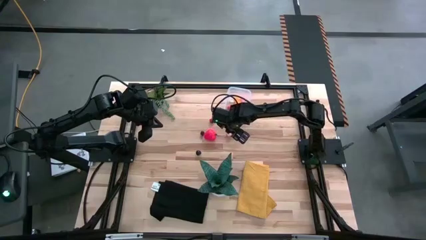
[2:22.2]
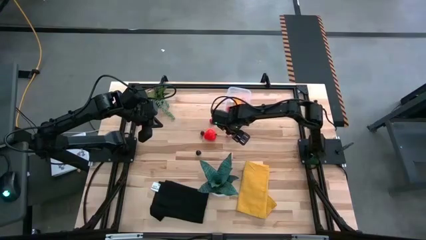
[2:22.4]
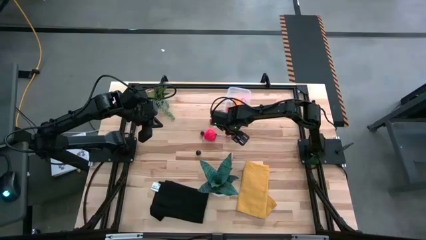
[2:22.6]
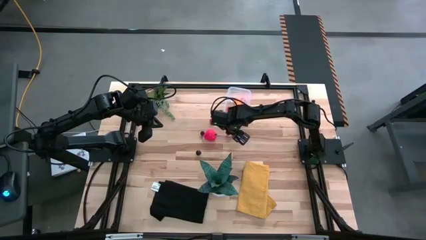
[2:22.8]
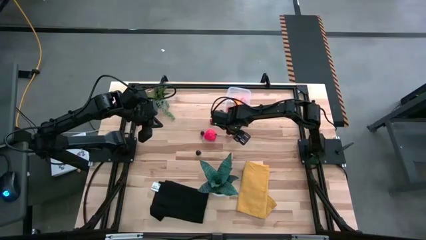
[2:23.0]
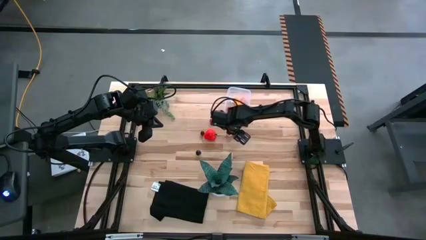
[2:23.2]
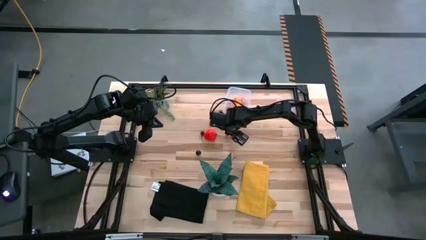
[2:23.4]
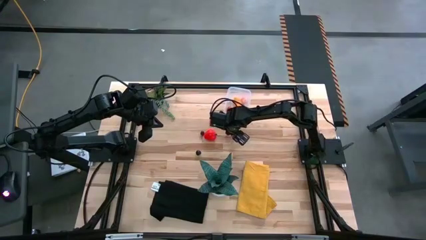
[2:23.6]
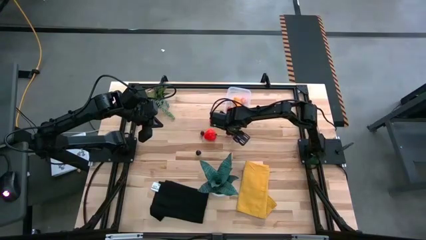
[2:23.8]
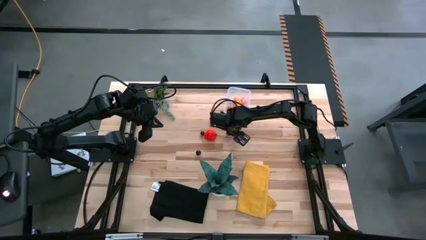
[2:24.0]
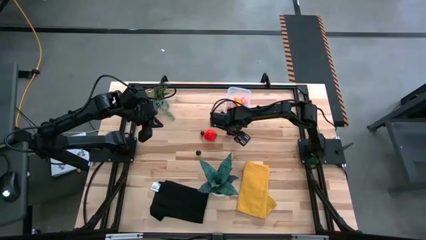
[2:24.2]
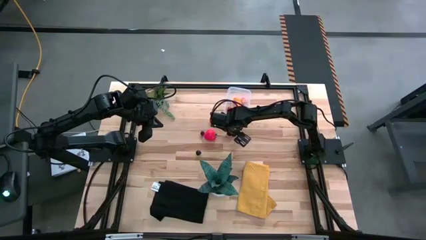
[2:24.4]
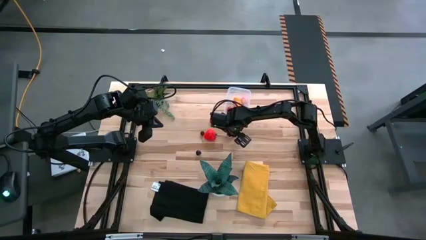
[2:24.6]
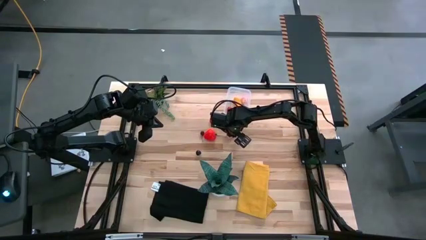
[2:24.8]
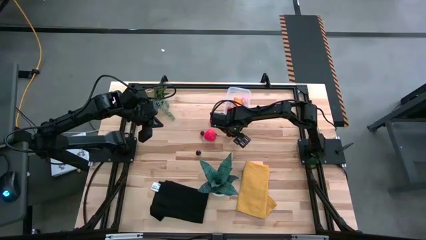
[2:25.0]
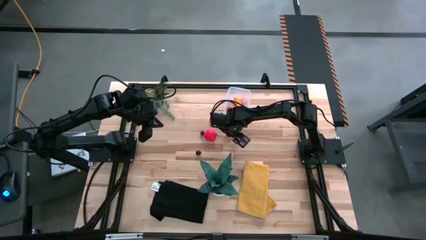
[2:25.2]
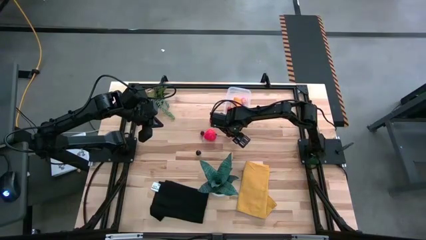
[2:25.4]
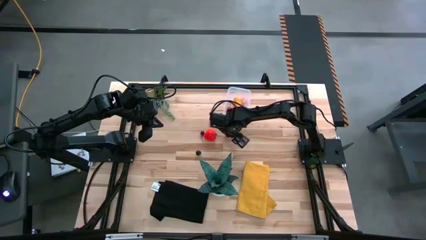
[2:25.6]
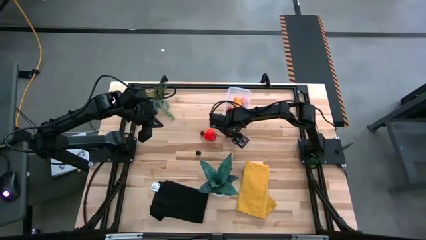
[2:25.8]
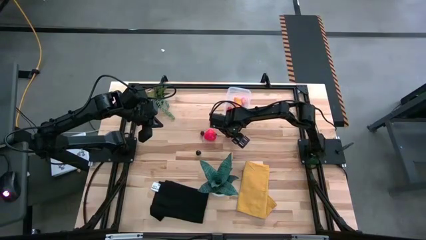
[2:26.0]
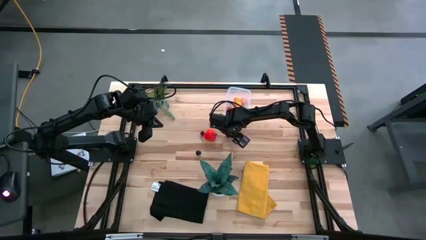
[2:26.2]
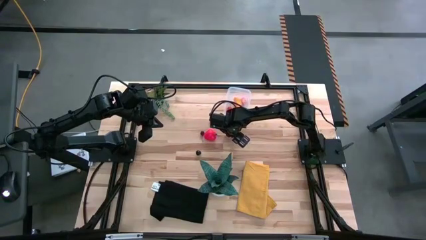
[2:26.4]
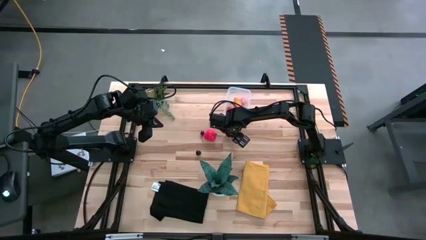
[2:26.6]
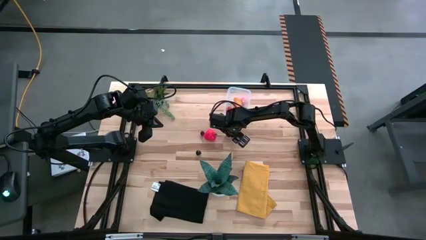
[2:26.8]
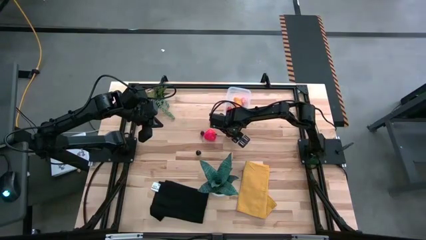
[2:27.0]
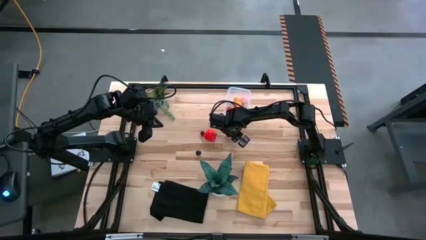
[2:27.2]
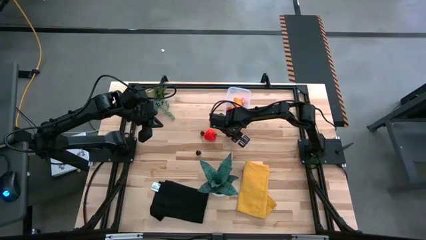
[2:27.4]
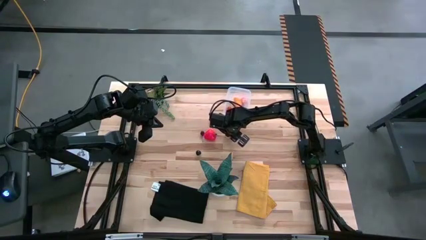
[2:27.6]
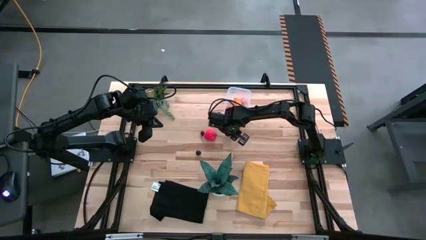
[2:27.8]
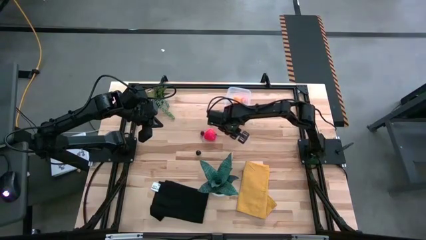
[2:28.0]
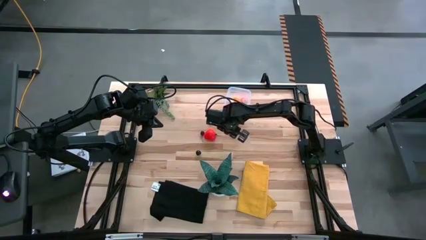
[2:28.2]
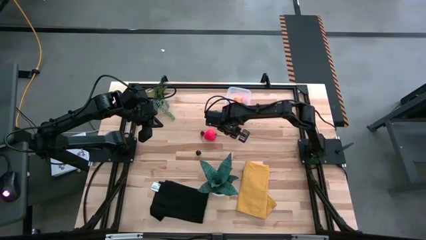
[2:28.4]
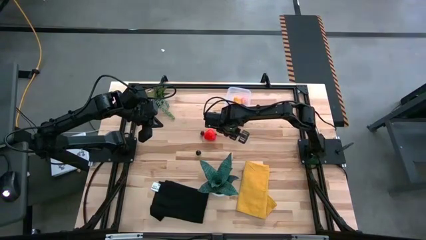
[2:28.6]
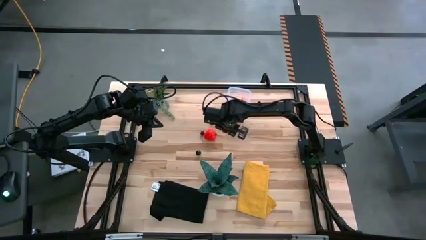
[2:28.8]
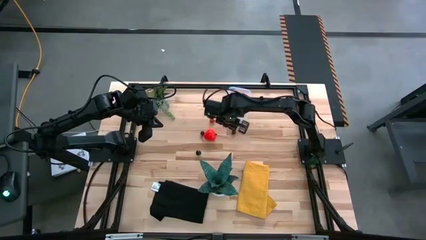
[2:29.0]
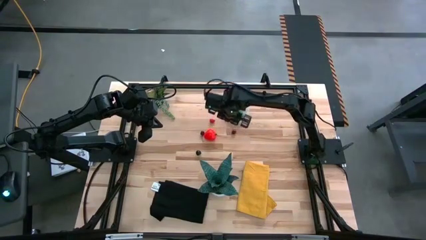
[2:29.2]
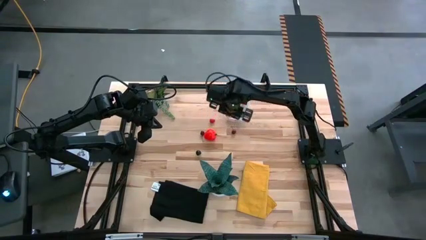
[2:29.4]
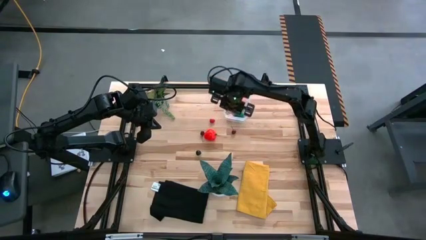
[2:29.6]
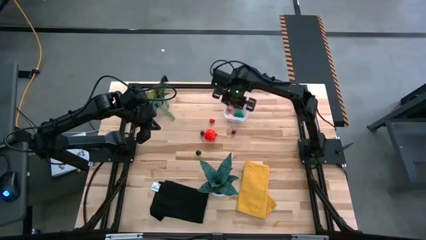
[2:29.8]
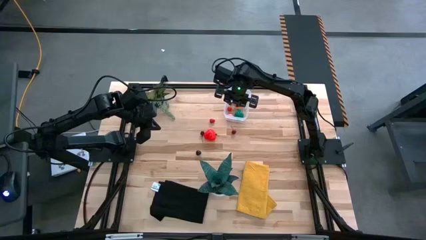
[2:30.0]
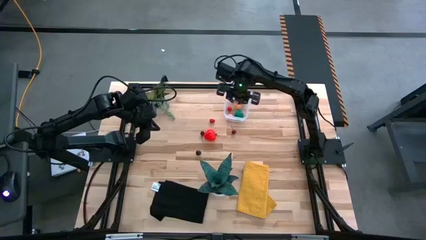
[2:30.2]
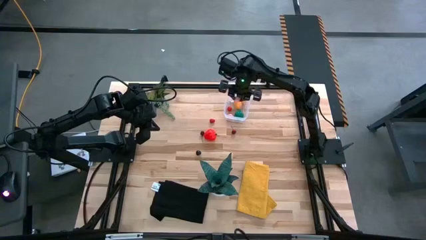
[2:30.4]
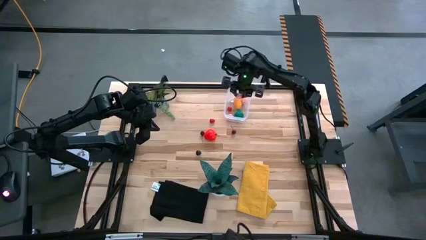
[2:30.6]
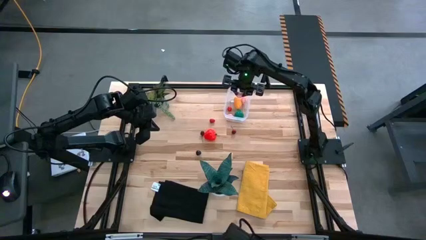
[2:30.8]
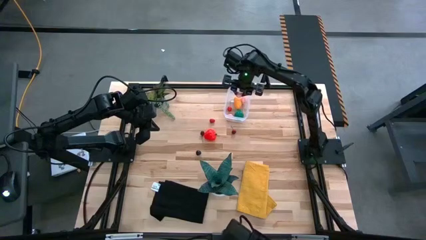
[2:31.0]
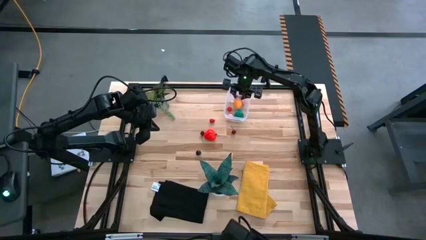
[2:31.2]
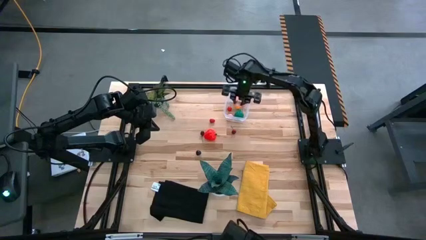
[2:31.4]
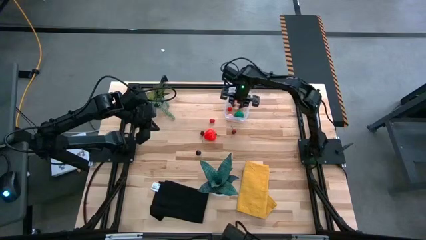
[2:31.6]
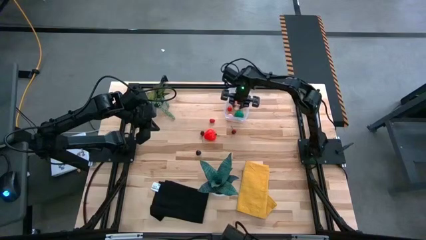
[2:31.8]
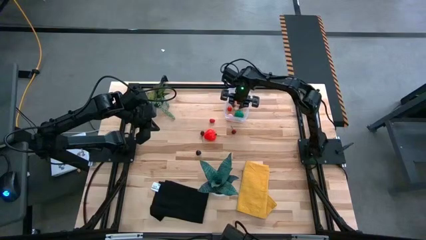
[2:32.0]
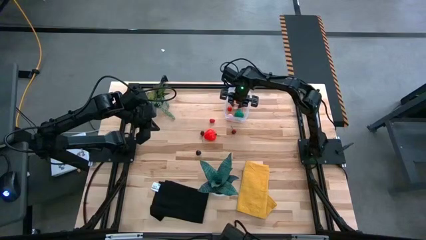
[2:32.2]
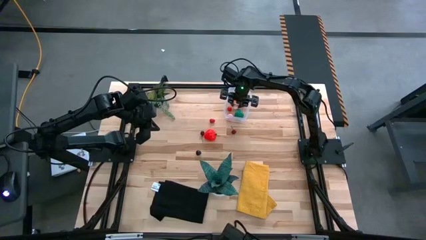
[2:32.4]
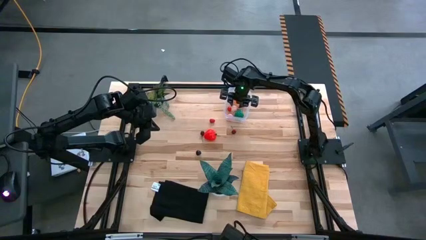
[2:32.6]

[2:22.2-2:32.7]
Task: Pick and placing Produce into tupperware
Put the apricot into the transparent container

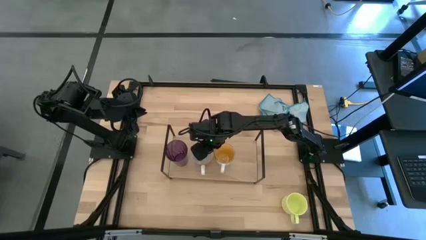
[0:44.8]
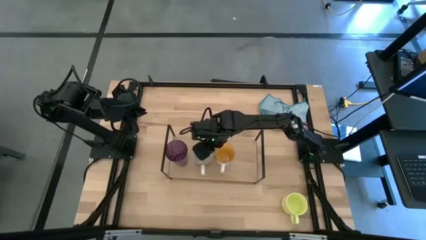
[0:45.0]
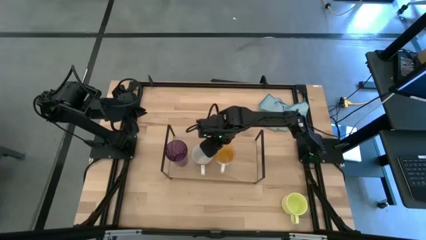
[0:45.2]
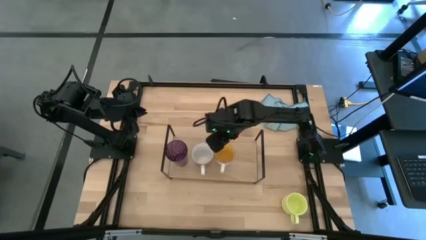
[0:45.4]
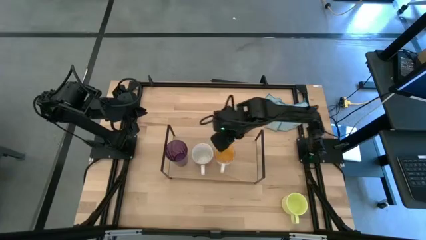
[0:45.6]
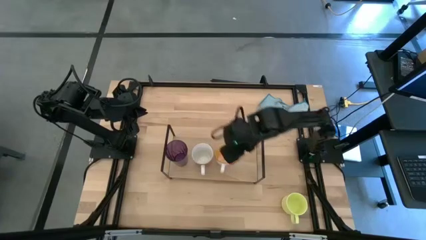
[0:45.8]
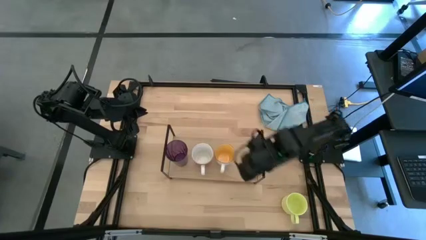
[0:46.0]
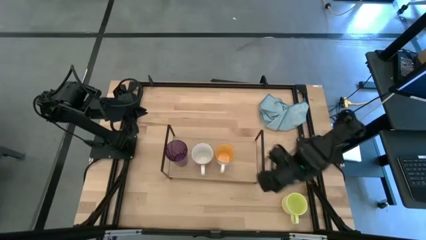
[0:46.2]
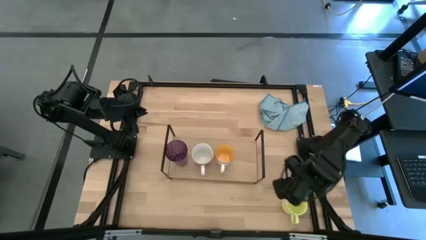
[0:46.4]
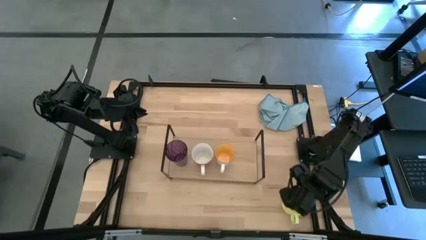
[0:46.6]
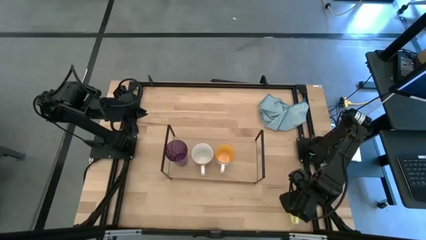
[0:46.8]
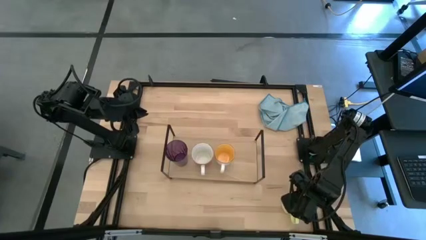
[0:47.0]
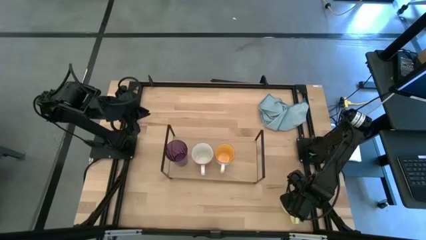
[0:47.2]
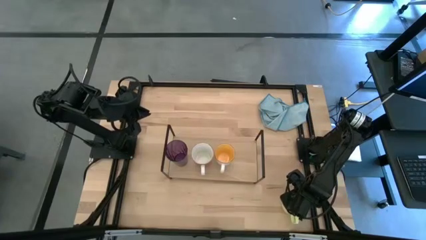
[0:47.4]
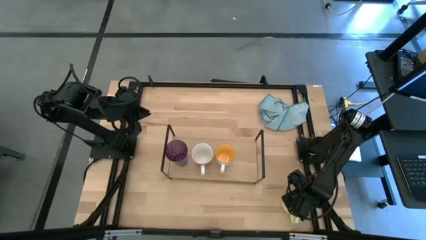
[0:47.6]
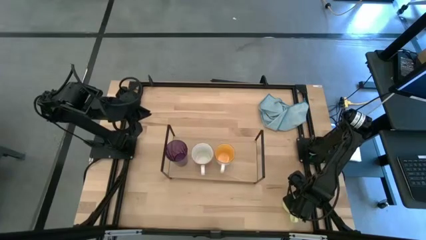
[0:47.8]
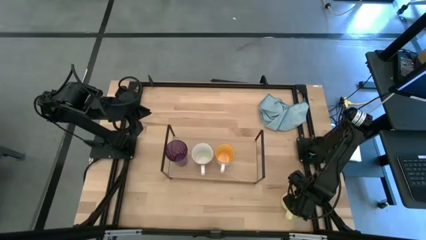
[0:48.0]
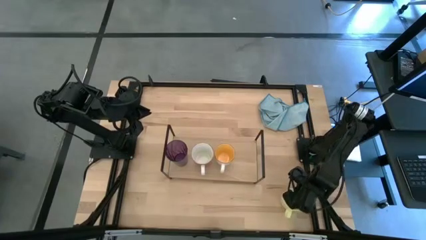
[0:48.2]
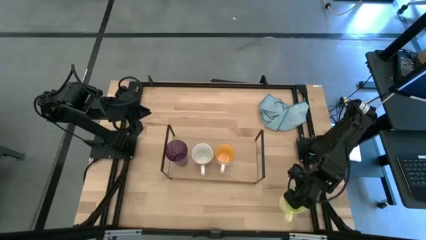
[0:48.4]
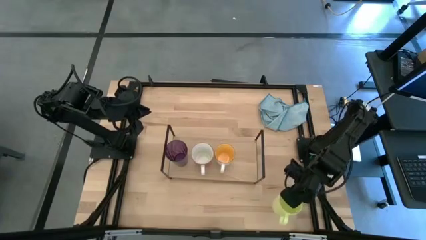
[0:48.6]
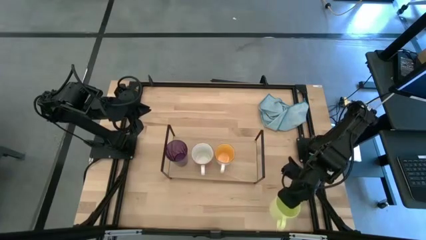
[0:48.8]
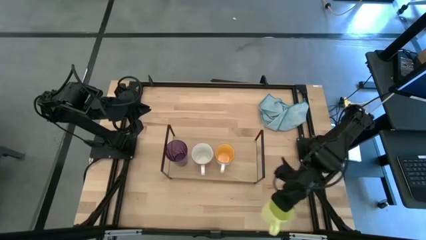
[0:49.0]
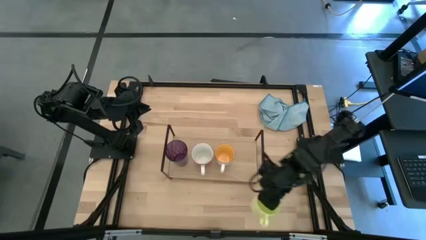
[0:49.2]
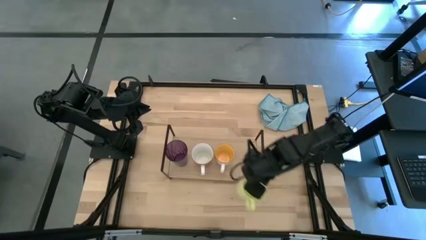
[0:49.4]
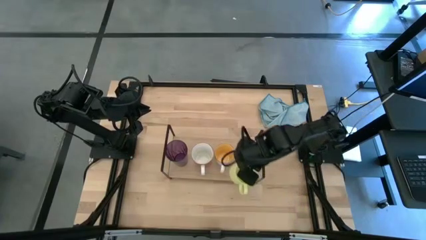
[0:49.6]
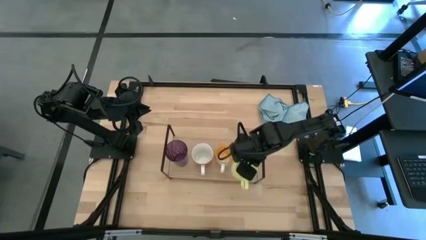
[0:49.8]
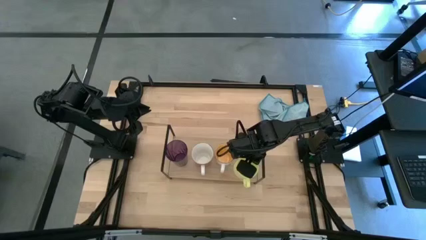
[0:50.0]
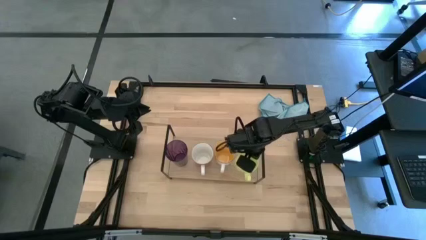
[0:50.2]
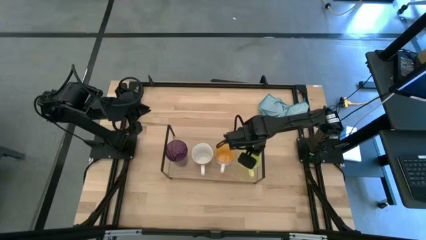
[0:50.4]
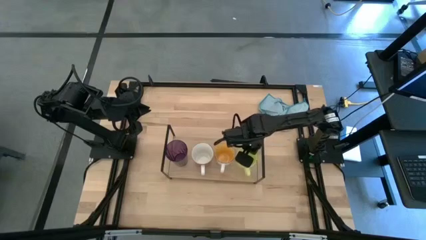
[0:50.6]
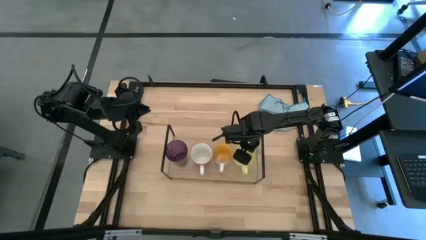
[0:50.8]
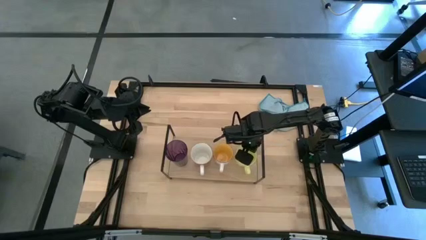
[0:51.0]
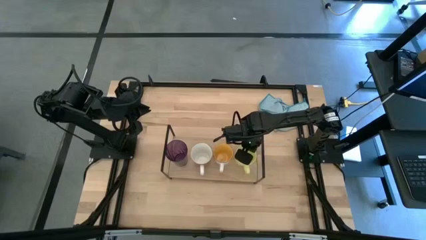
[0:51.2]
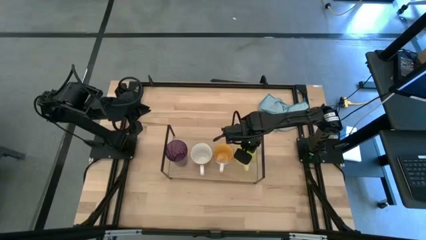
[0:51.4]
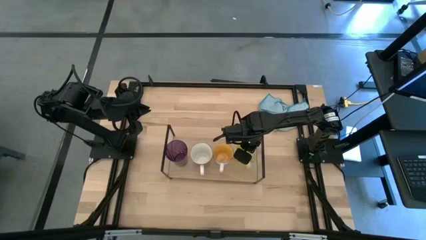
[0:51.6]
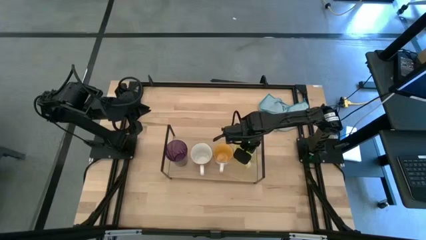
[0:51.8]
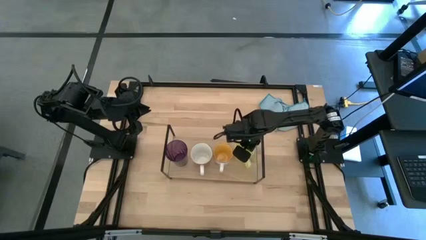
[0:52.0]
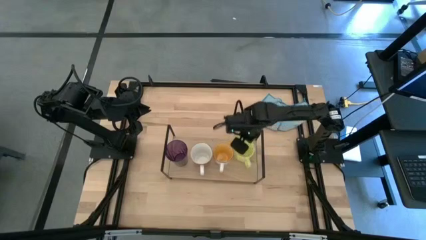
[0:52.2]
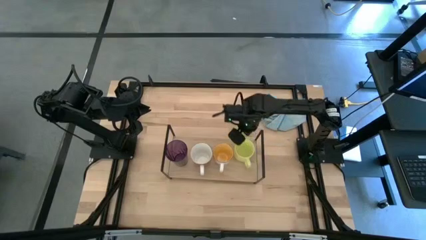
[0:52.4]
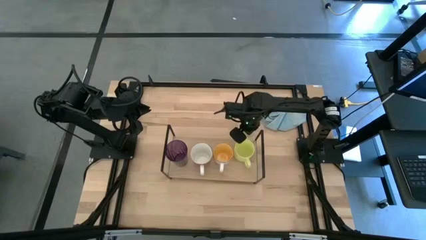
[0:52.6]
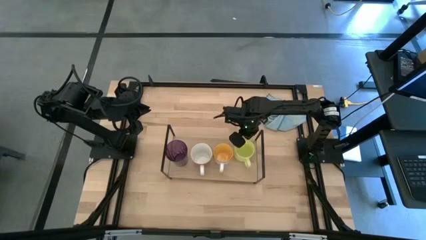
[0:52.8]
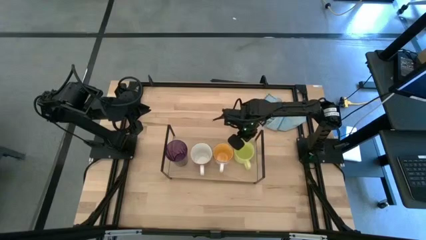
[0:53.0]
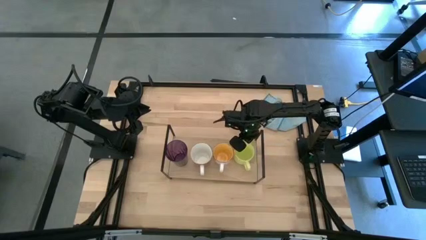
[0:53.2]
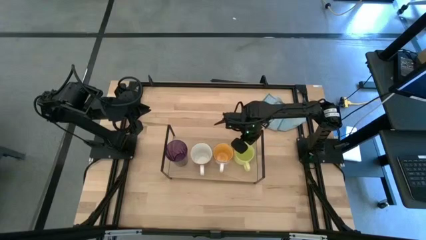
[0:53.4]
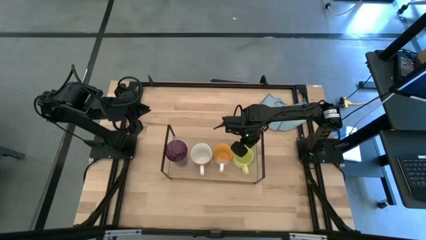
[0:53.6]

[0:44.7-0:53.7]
Task: Stack small to large cups/mugs on shelf
Put the light green mug on the shelf
